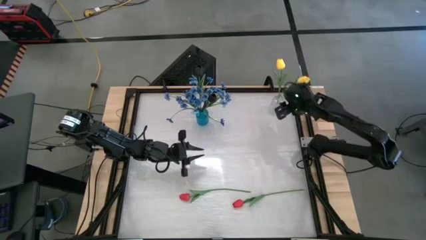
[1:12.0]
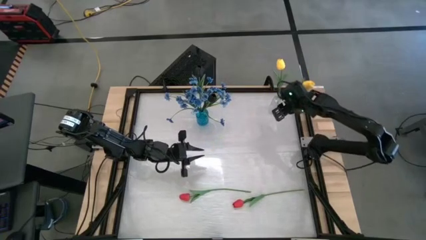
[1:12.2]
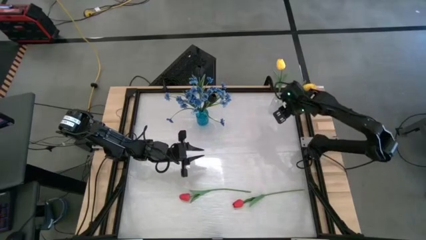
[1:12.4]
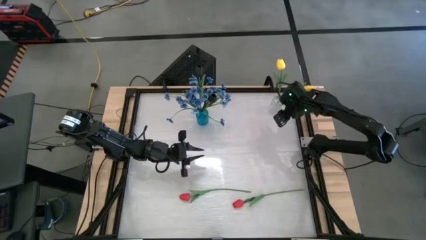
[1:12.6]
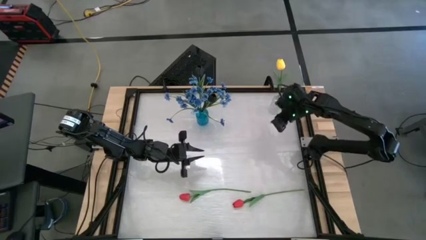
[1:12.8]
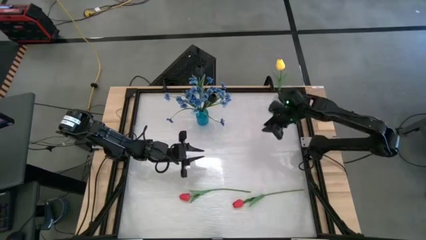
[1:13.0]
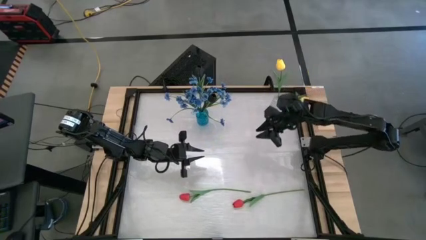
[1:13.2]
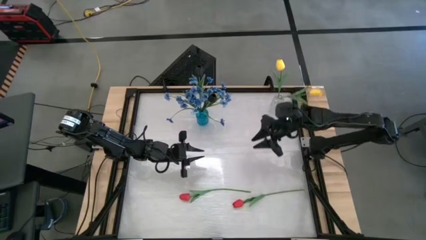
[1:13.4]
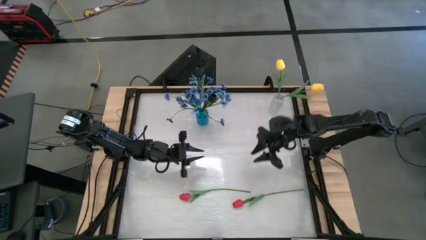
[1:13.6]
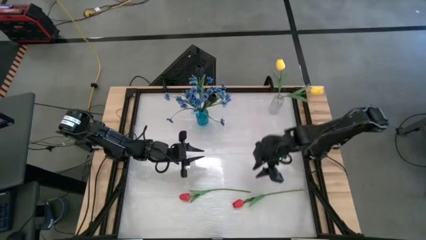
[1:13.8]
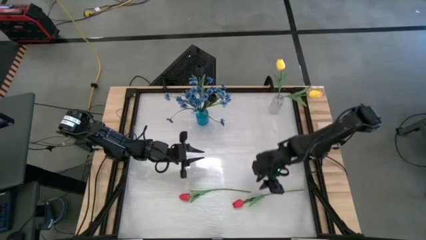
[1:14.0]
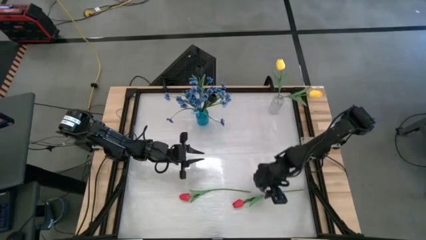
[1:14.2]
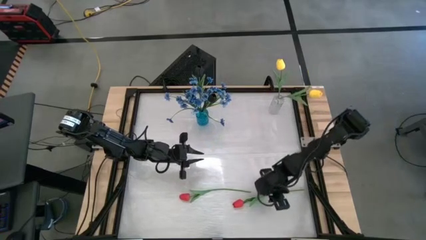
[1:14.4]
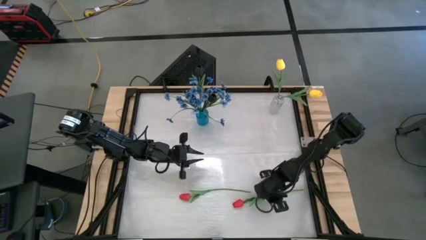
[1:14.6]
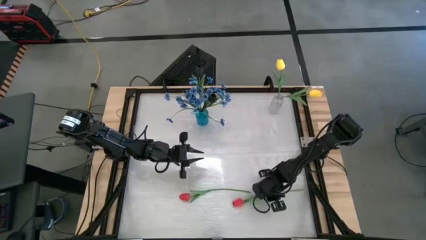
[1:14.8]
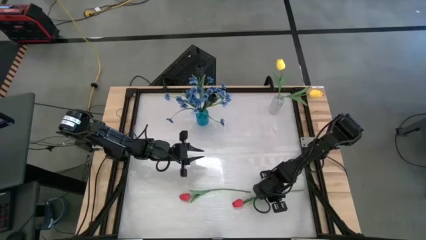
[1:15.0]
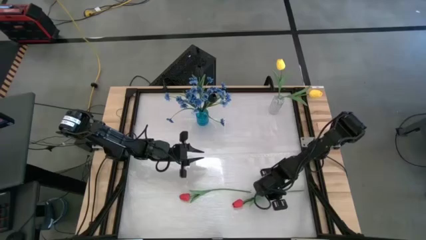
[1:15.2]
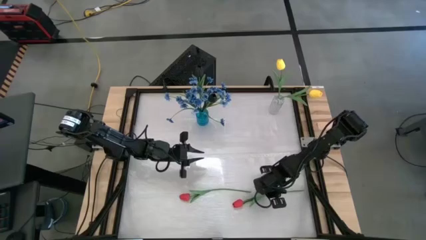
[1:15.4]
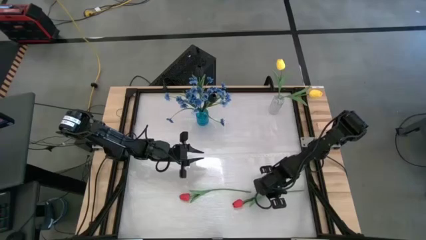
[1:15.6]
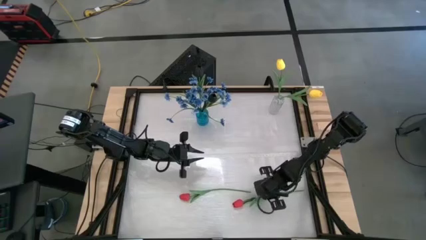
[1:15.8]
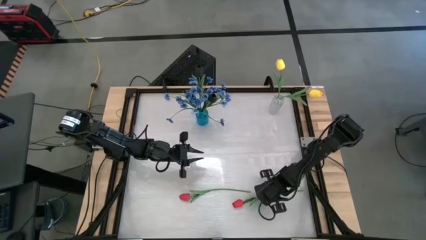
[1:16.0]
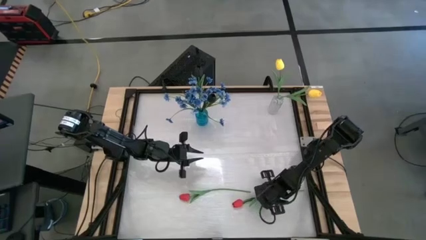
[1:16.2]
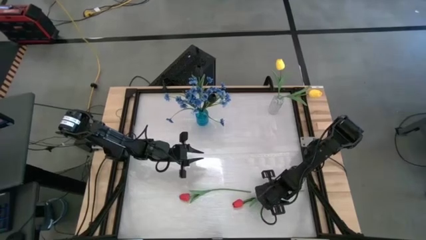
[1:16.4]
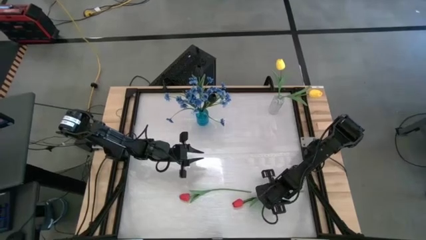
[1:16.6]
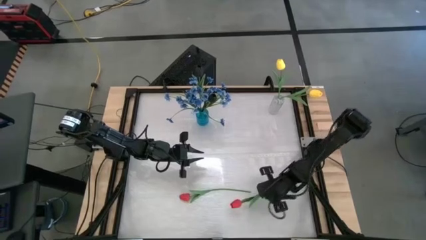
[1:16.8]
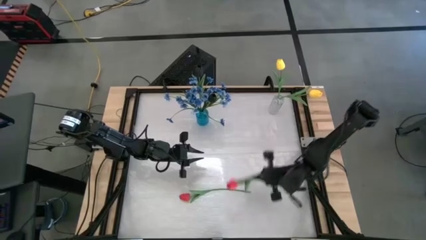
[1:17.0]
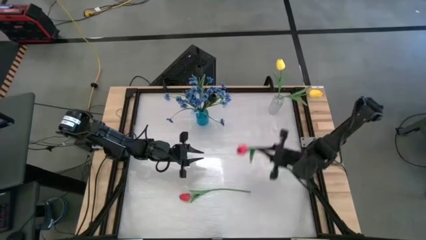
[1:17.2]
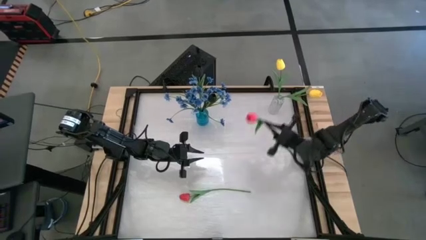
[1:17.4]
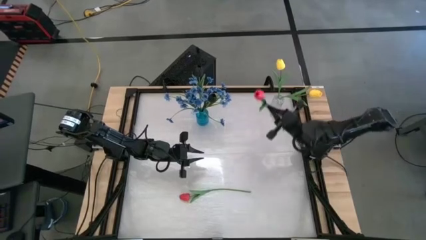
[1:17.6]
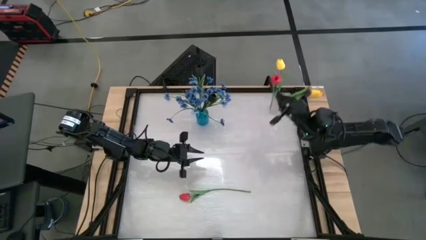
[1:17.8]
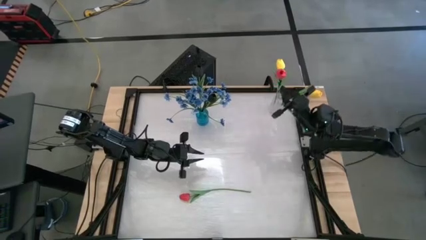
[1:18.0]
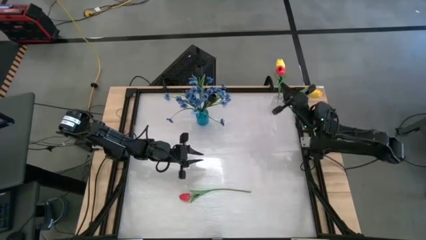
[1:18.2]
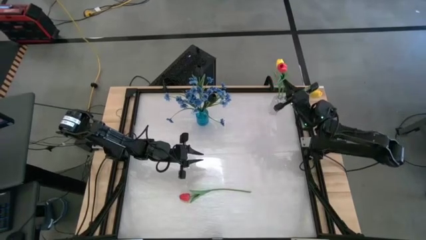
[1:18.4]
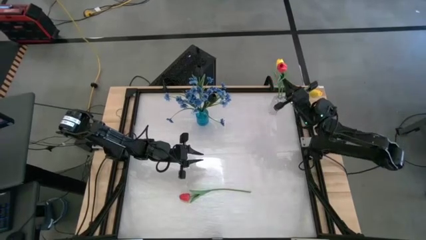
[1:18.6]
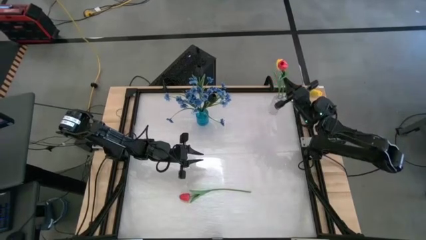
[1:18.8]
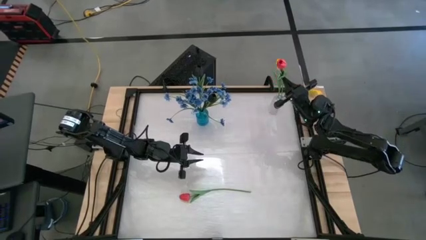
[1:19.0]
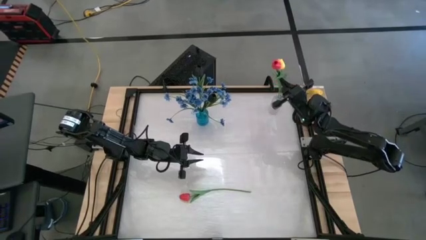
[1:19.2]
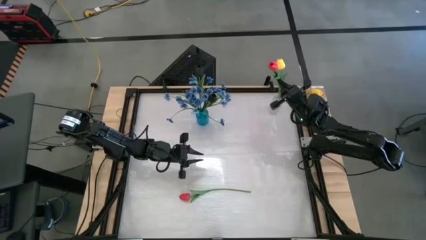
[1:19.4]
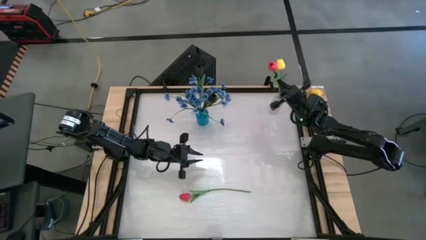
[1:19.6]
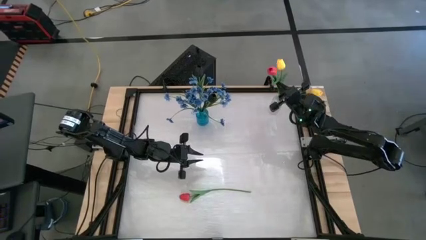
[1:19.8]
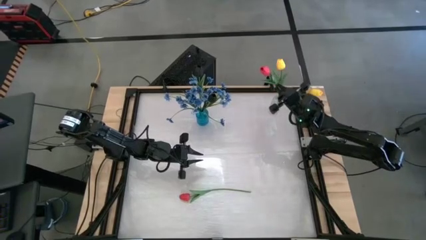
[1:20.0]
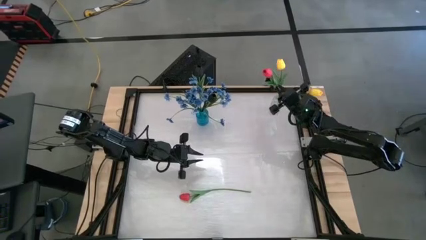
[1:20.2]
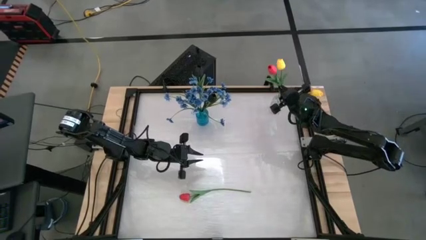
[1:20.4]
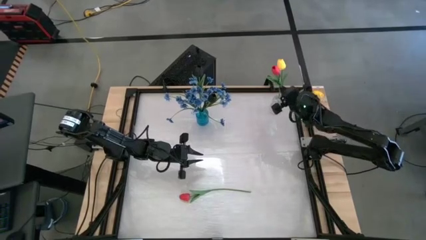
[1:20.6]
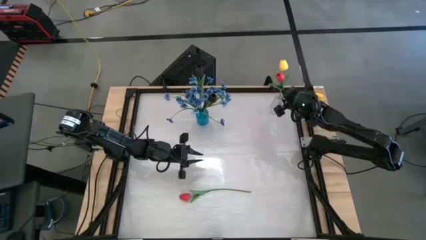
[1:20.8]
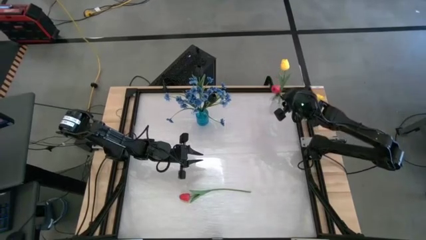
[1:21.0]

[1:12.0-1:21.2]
Task: Sort flowers into vase by color
Put the right red flower into the transparent vase

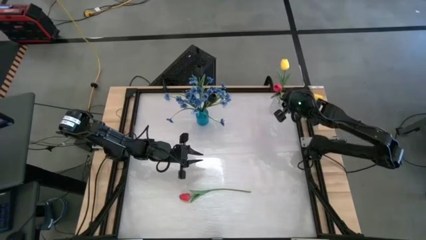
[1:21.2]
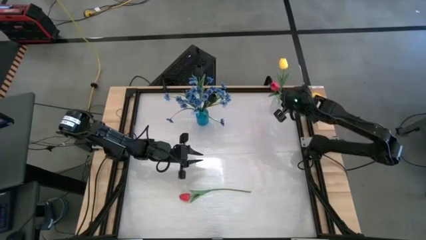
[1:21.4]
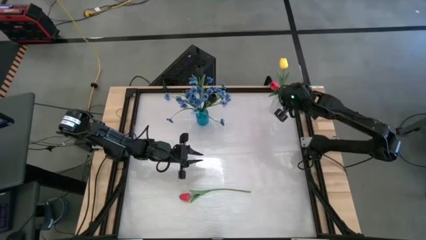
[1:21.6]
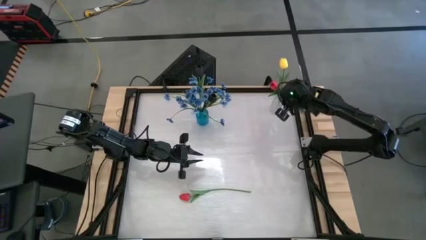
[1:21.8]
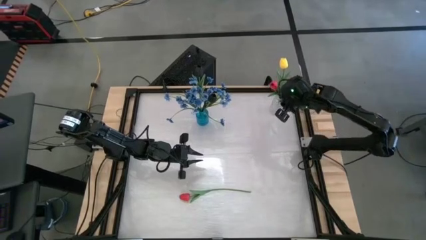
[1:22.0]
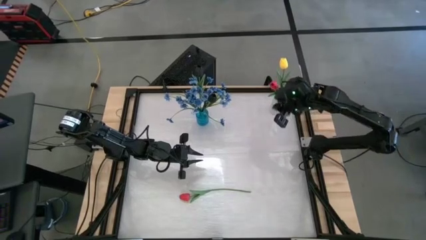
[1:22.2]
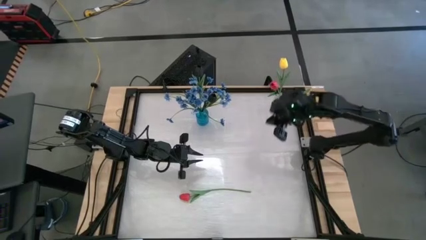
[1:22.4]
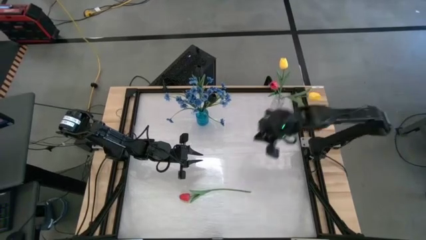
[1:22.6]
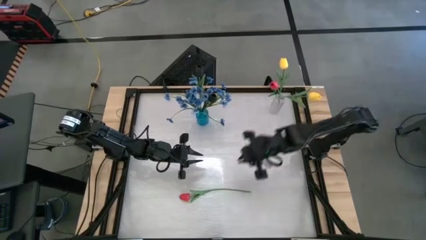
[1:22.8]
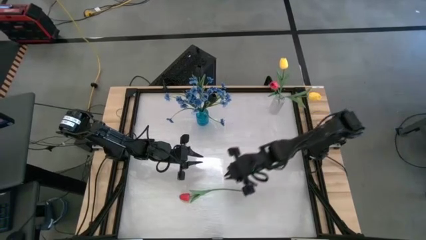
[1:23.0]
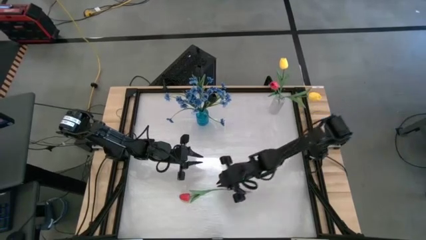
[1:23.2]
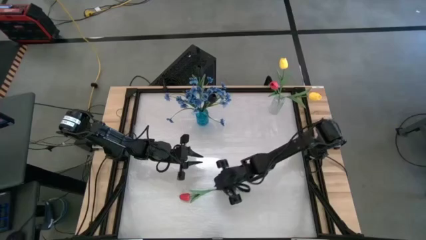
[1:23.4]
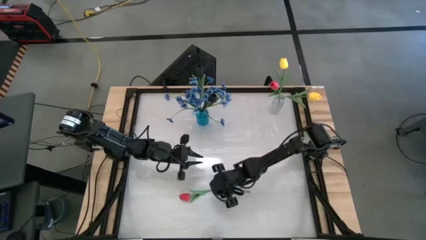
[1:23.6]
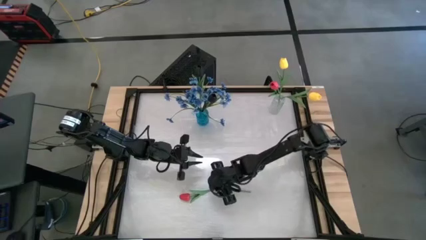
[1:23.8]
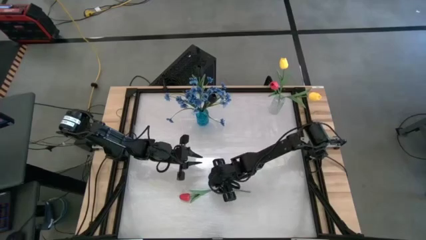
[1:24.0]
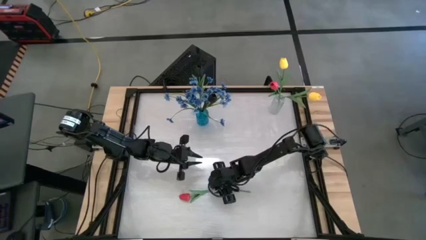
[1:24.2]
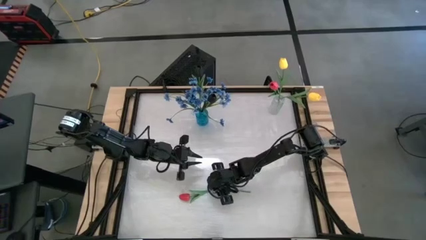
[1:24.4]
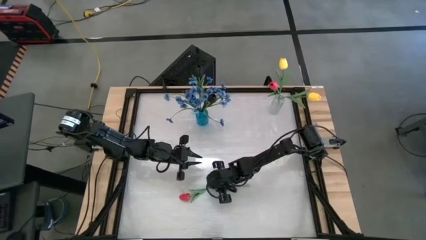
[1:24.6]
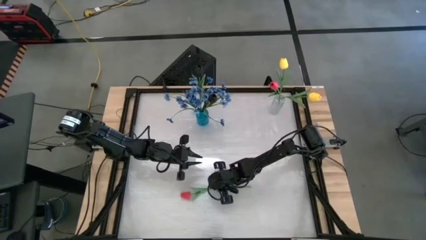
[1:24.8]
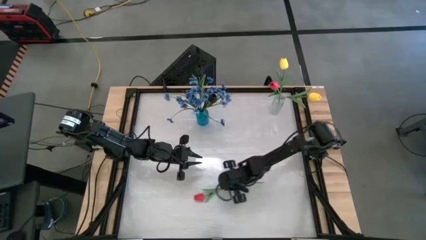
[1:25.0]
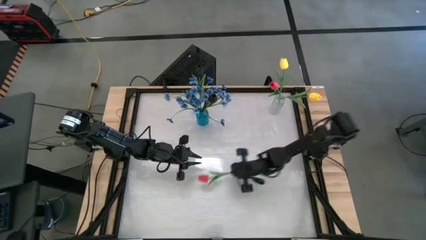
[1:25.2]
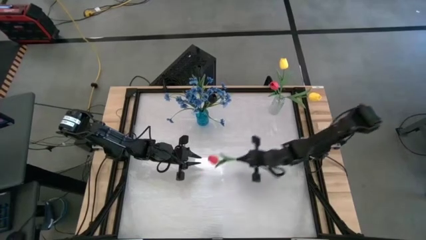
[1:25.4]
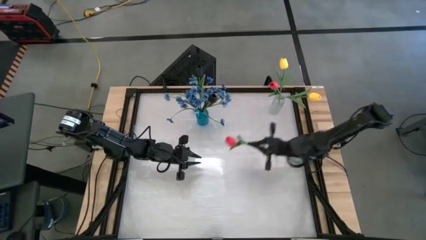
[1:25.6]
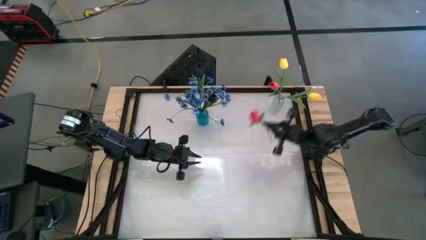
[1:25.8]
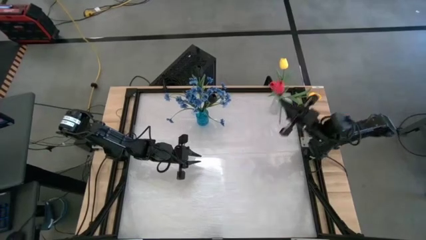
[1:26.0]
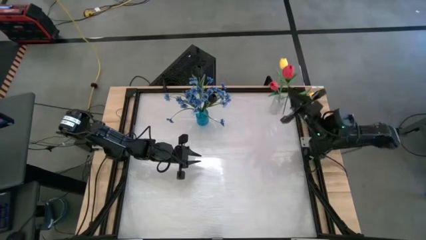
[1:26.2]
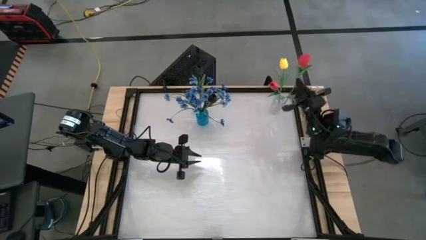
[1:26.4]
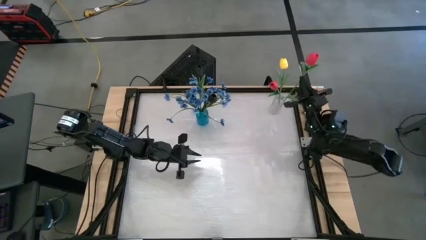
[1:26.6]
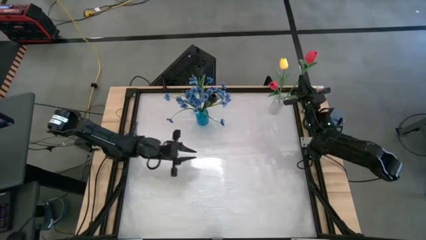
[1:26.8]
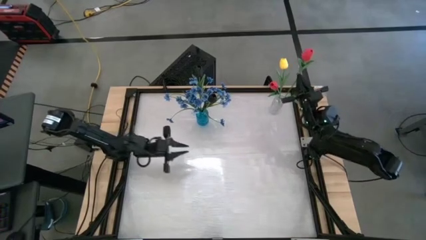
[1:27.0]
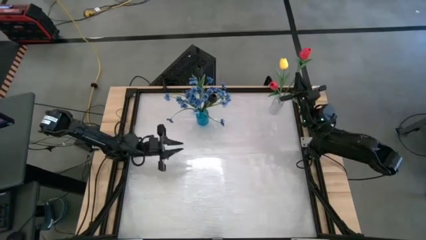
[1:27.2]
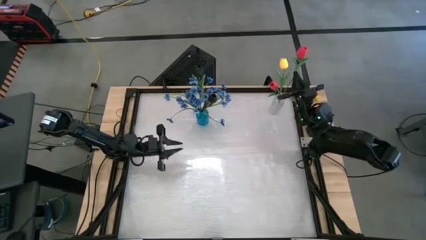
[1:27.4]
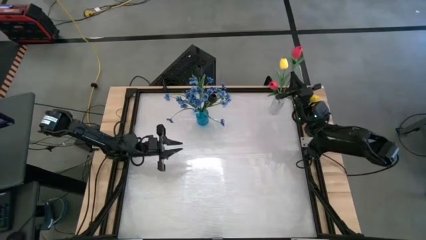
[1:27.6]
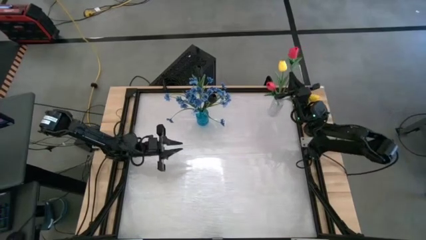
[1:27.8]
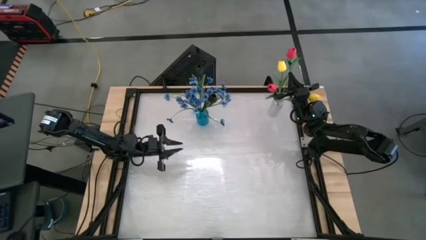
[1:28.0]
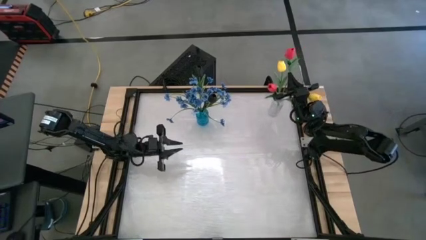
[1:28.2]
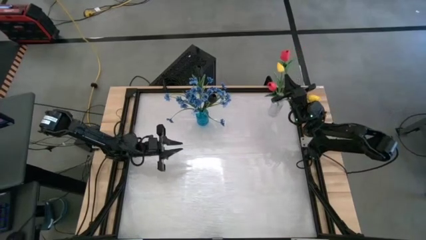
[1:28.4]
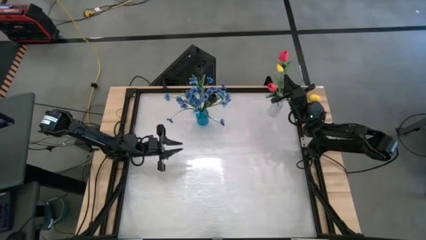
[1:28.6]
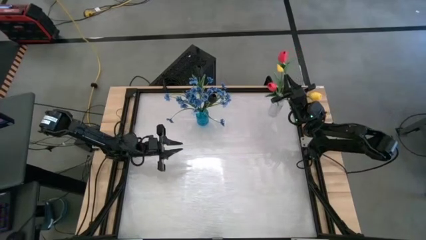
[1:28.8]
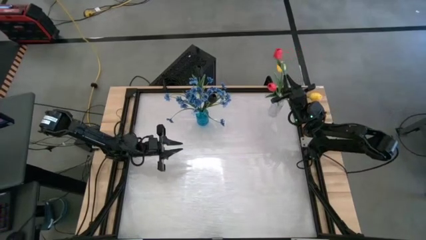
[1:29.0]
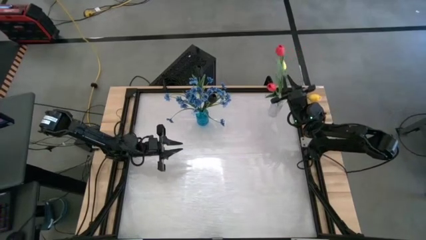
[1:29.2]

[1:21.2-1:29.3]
Put the red flower into the transparent vase
